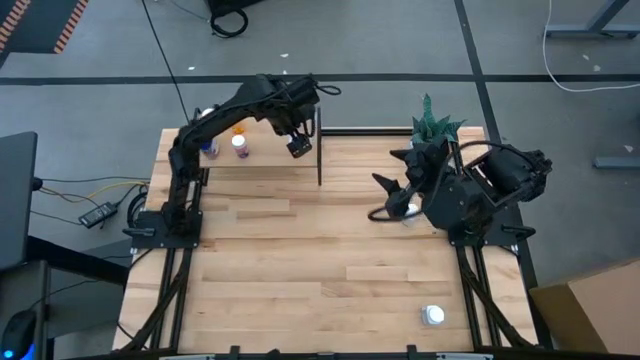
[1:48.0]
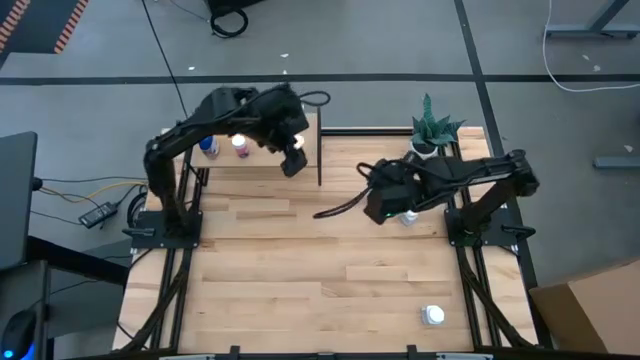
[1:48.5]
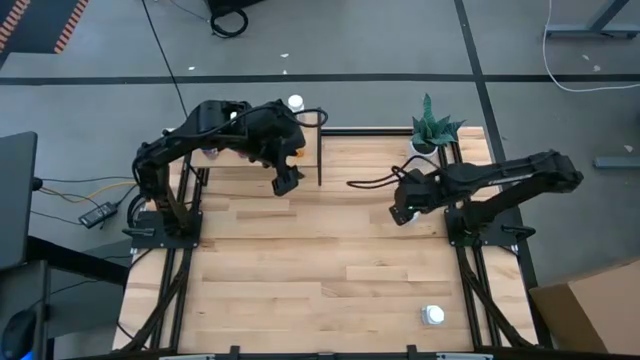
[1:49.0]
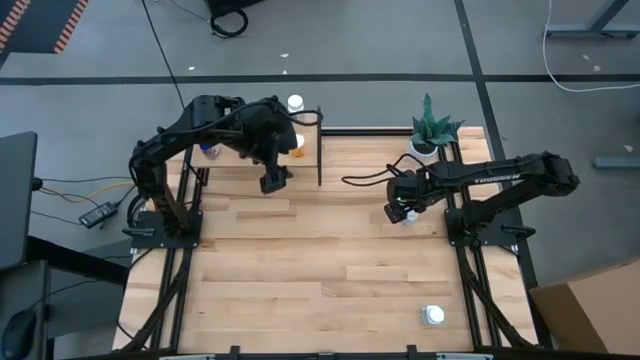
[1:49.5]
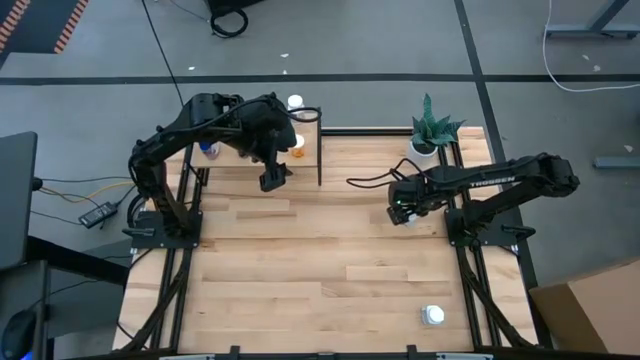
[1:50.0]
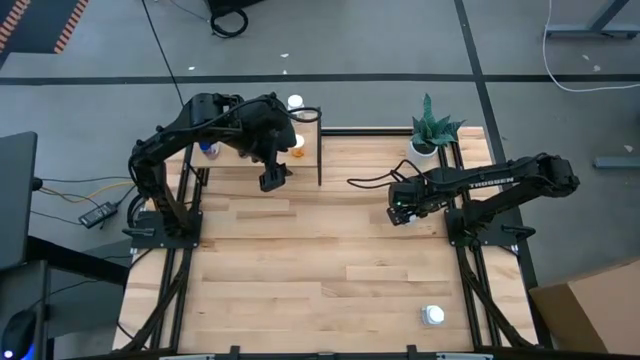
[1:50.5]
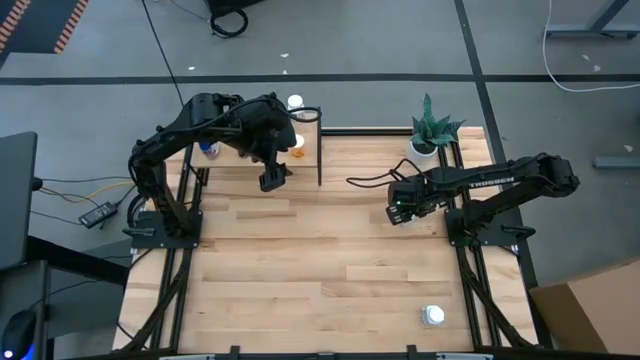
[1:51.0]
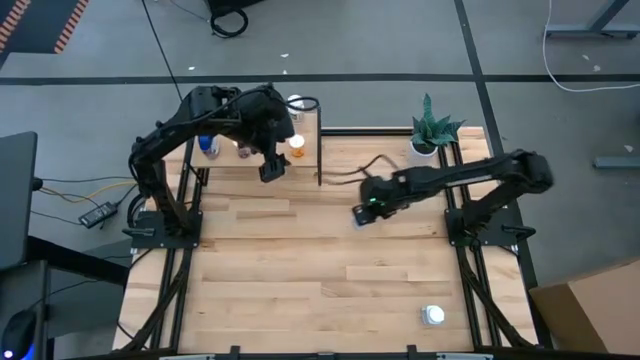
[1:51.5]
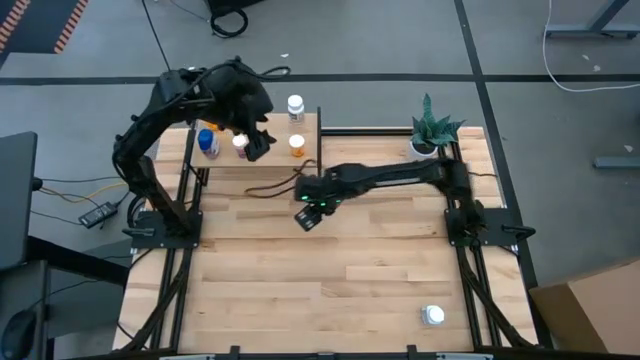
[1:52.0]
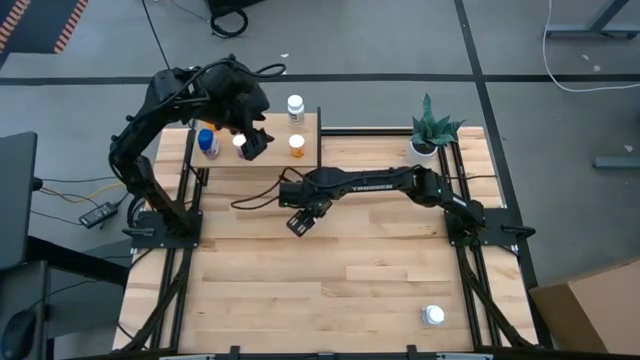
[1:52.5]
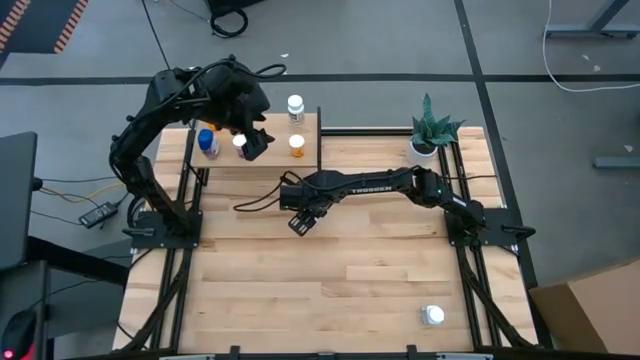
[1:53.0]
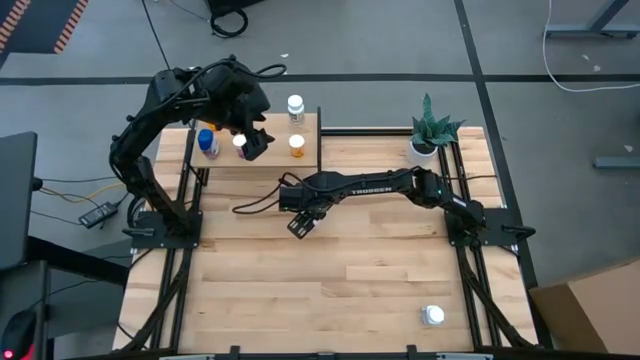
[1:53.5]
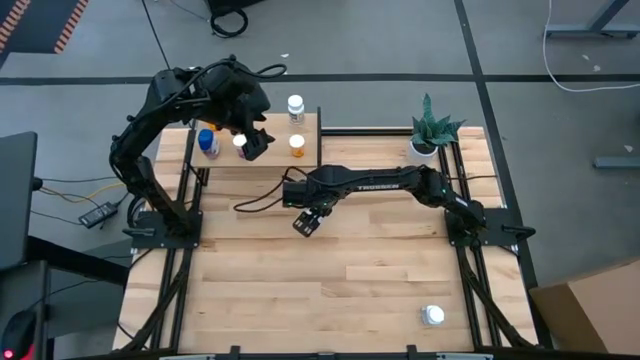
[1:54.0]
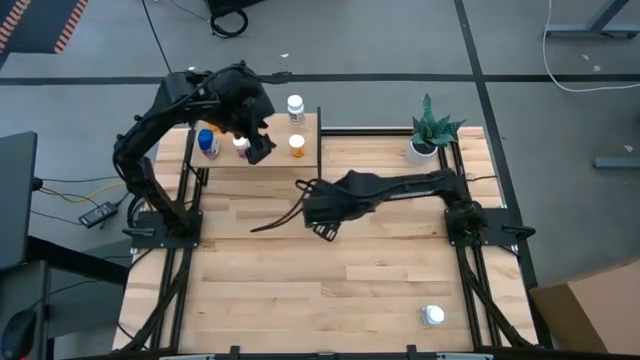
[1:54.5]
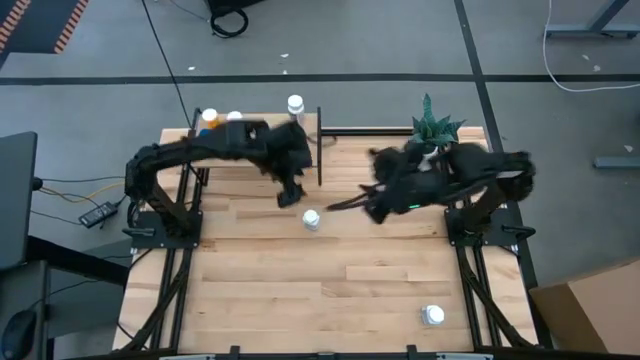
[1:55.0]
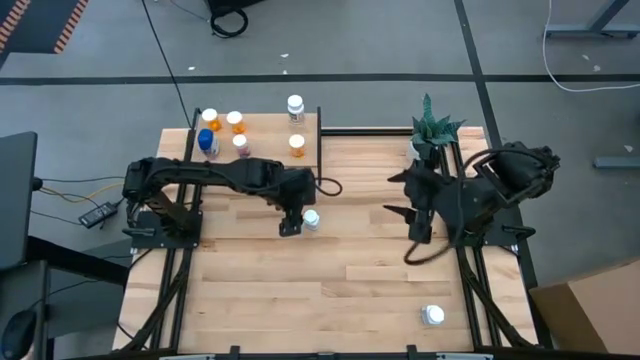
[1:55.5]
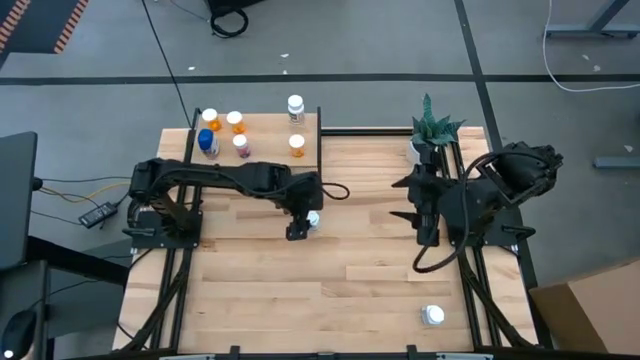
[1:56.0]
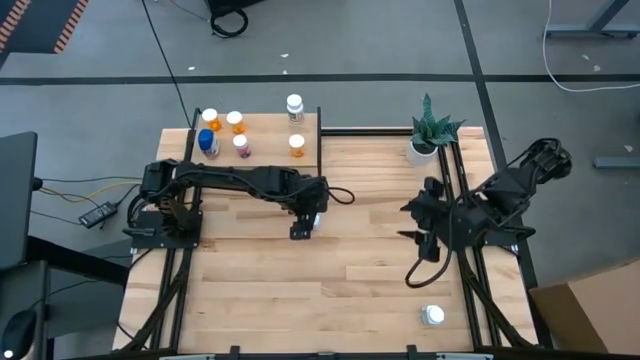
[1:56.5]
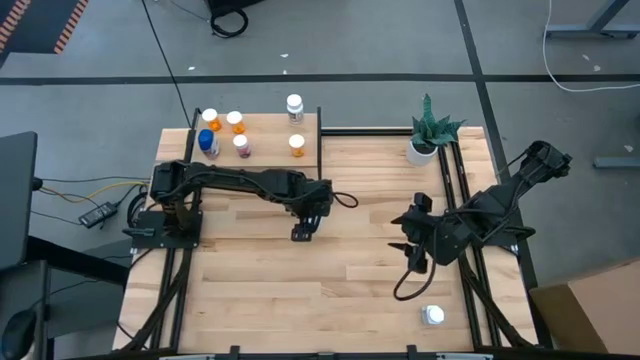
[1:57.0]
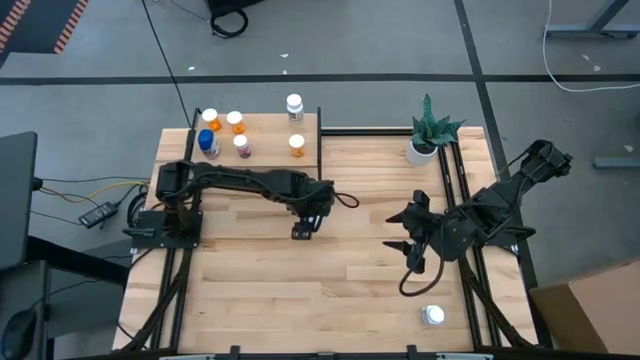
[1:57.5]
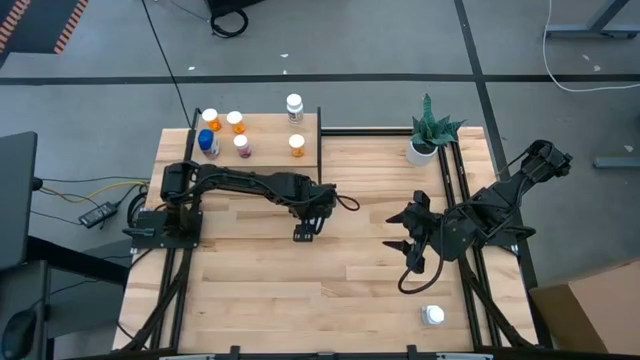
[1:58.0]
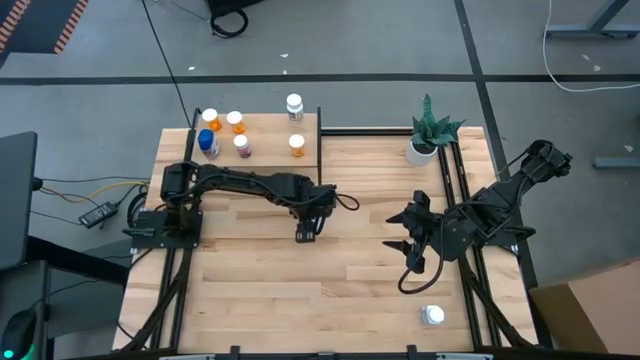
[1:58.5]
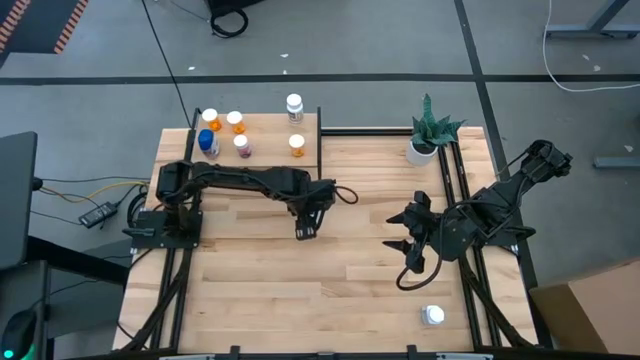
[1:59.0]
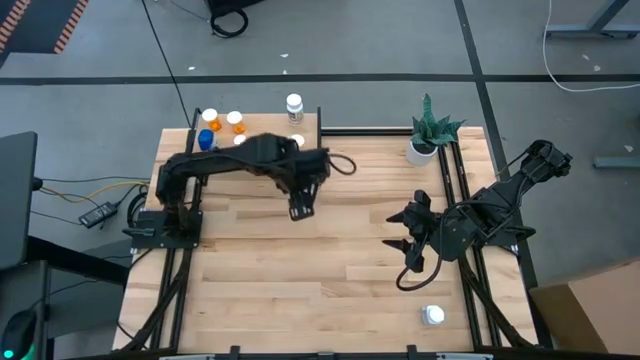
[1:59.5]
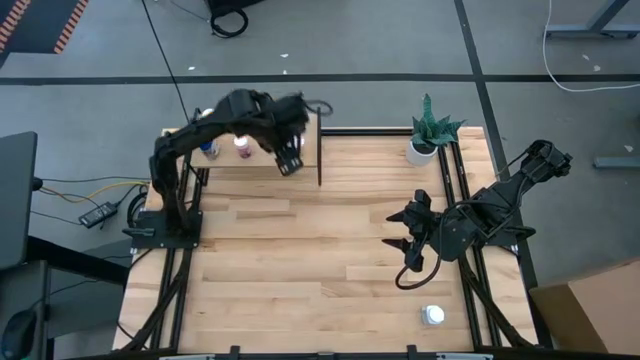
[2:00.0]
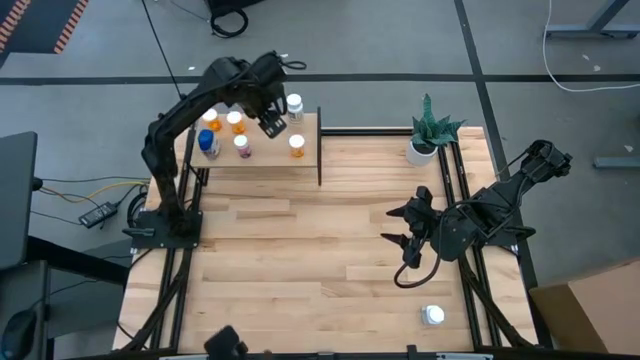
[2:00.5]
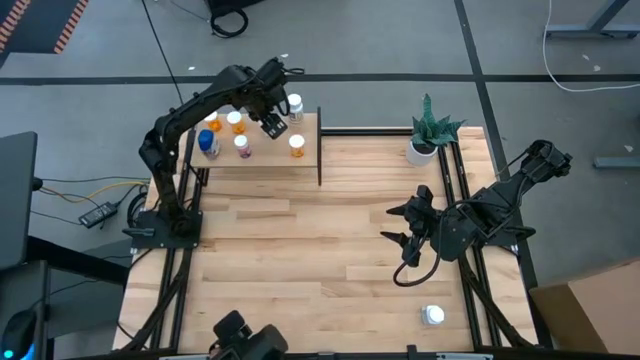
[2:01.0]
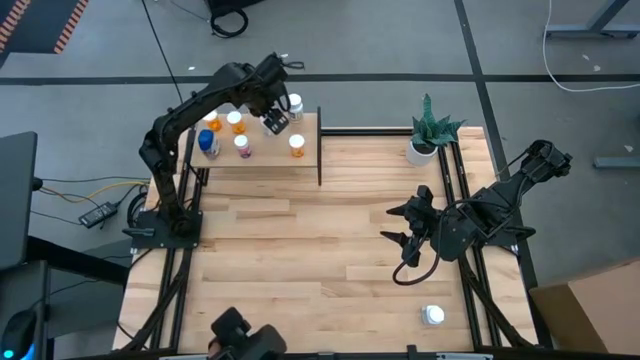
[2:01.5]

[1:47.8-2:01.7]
Task: Pick and place medicine bottles onto shelf by color
Put the top white and blue pill bottle on the shelf

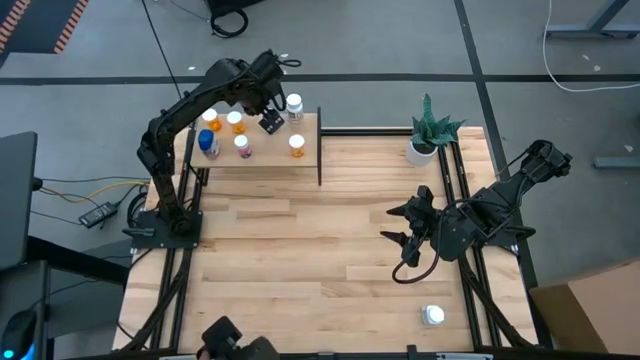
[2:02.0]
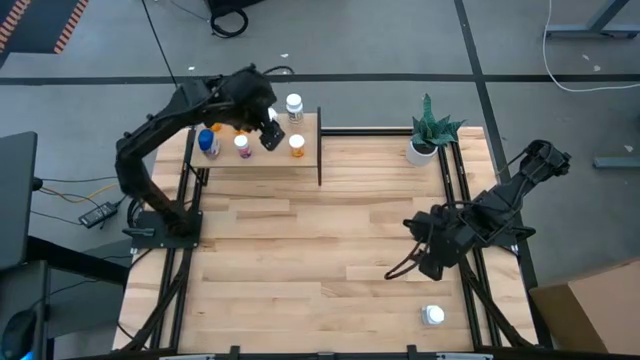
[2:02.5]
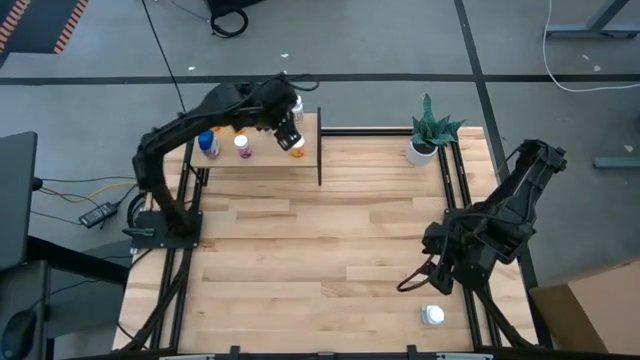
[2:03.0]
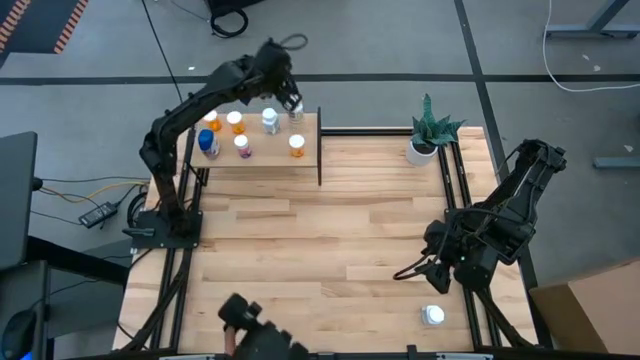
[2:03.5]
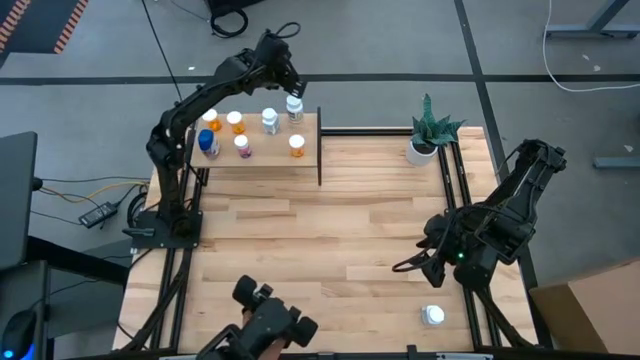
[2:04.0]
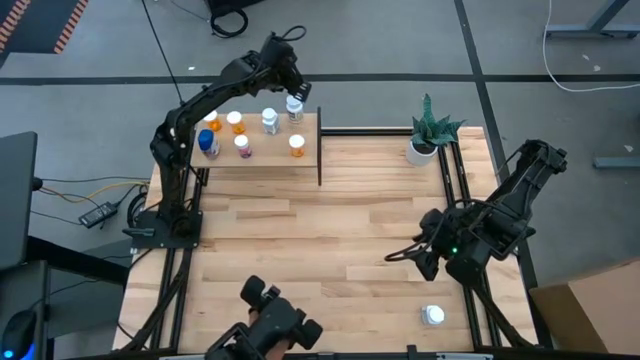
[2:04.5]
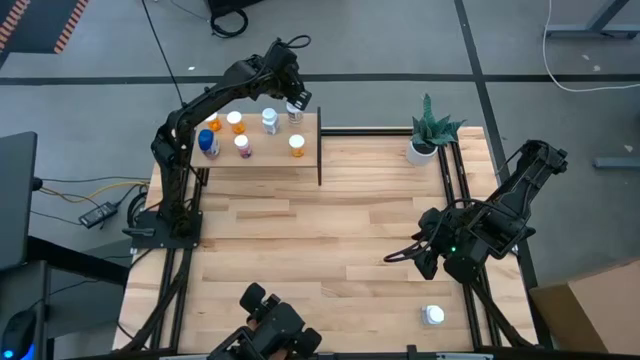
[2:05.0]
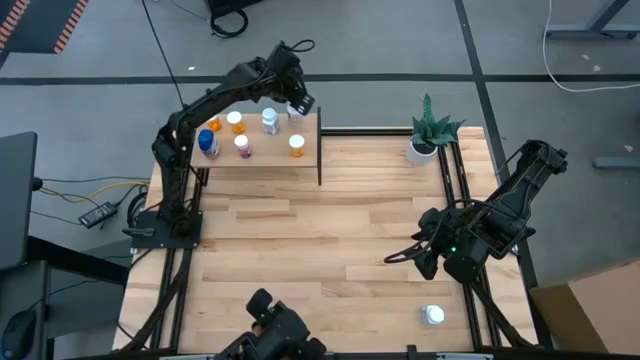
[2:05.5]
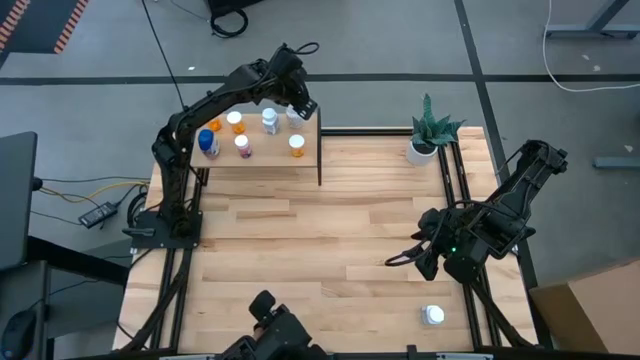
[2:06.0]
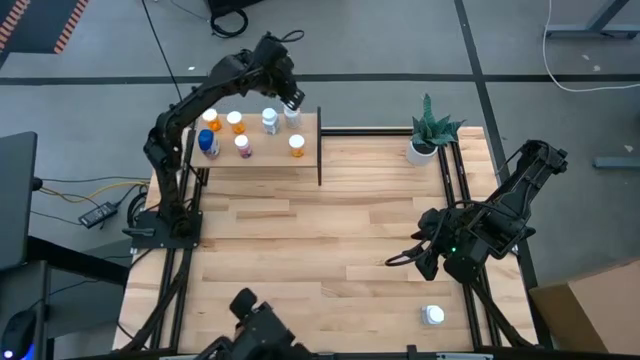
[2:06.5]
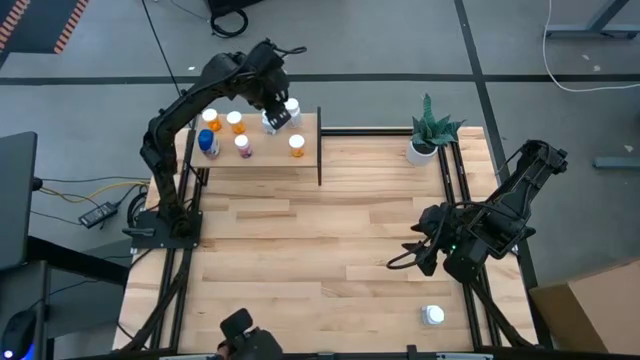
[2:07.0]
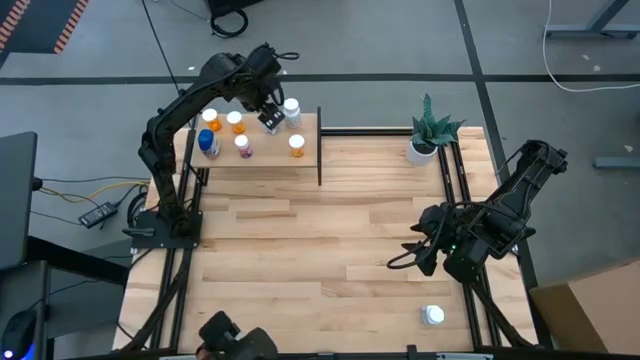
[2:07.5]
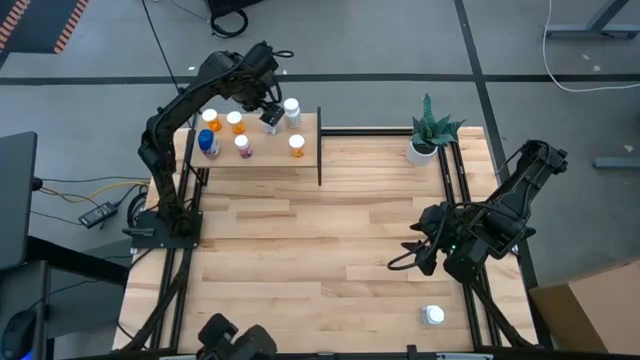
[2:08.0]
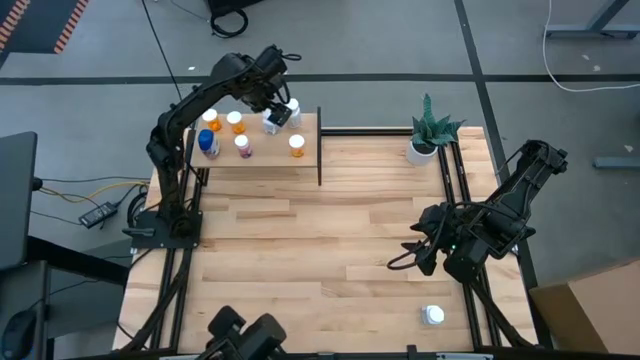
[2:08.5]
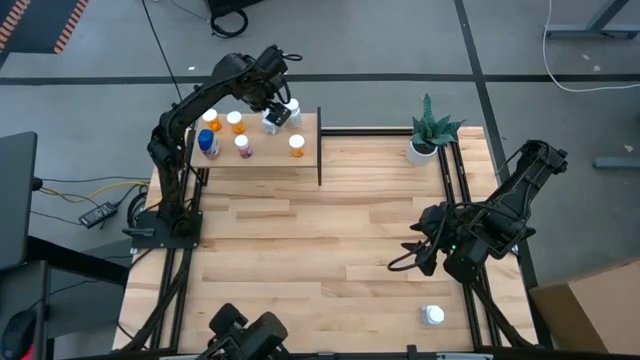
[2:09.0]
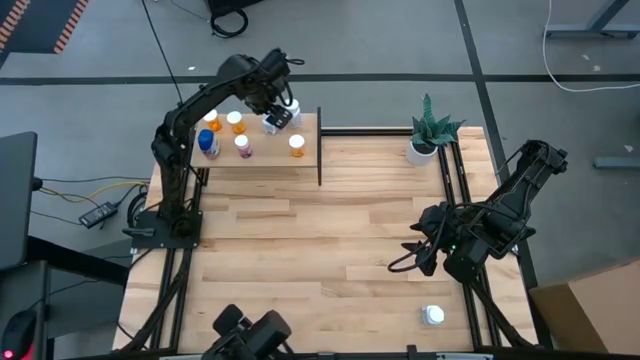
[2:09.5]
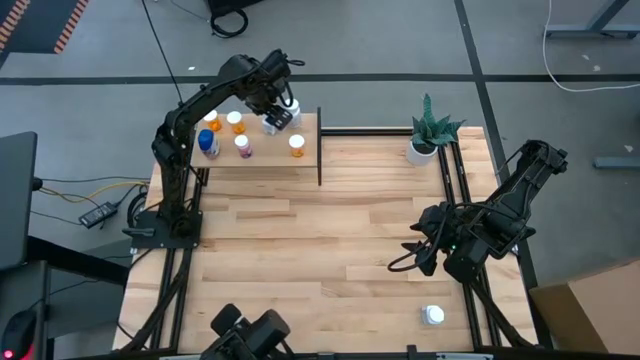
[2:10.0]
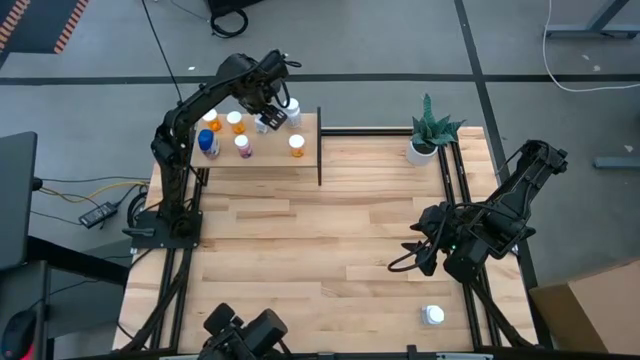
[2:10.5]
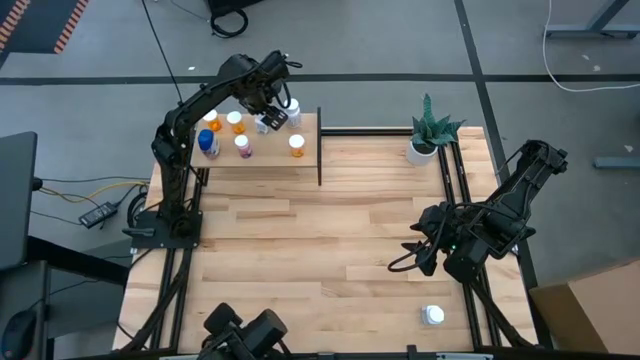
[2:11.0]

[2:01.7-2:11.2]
Adjust the pill bottles on the shelf
